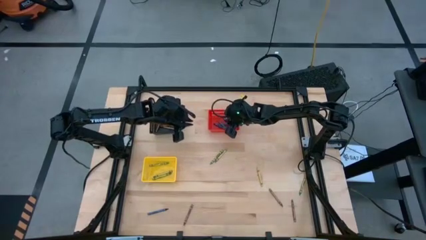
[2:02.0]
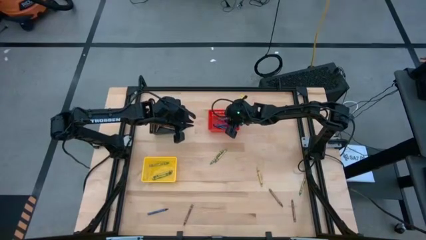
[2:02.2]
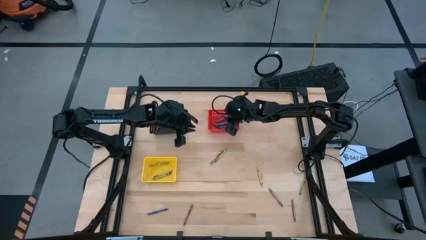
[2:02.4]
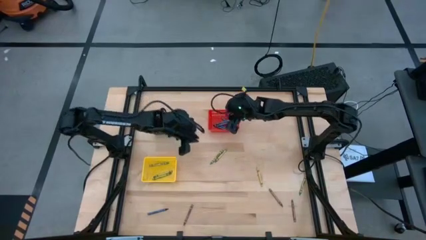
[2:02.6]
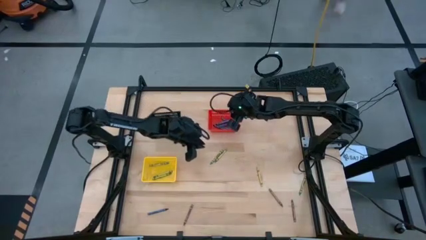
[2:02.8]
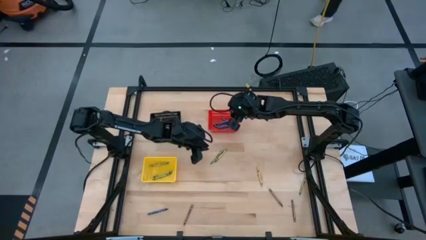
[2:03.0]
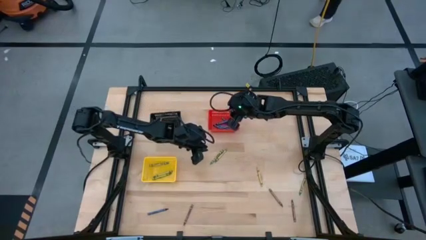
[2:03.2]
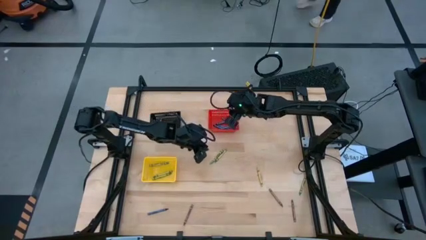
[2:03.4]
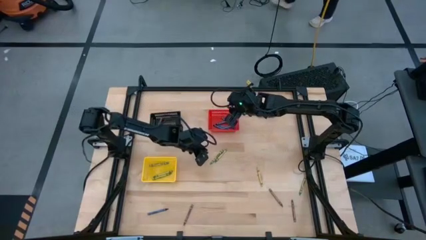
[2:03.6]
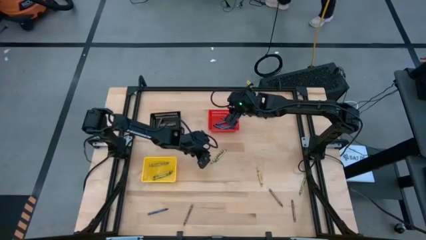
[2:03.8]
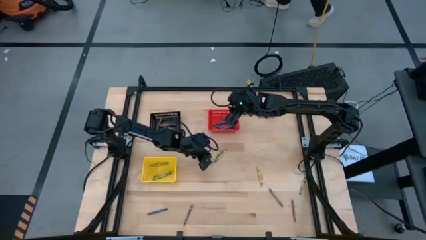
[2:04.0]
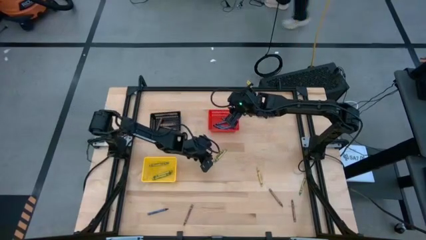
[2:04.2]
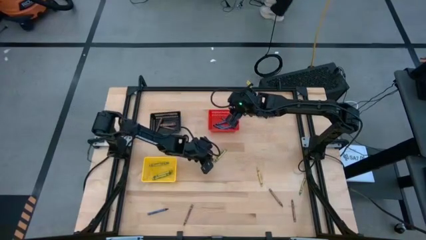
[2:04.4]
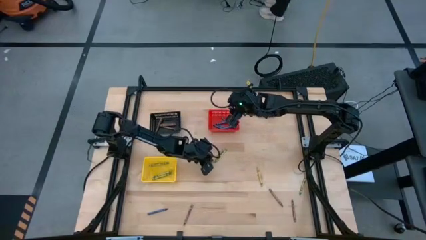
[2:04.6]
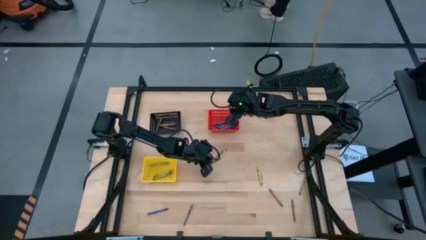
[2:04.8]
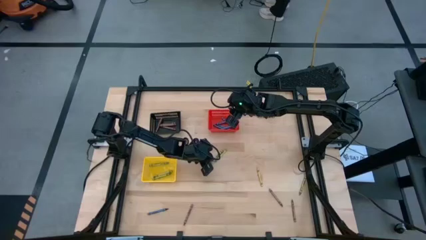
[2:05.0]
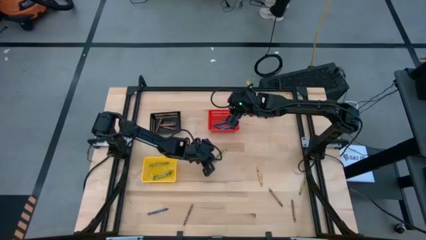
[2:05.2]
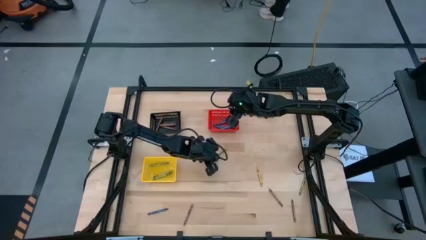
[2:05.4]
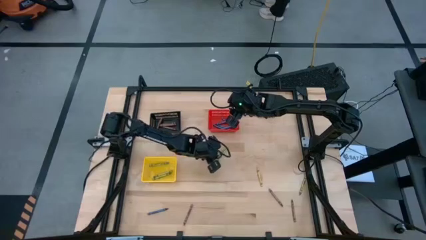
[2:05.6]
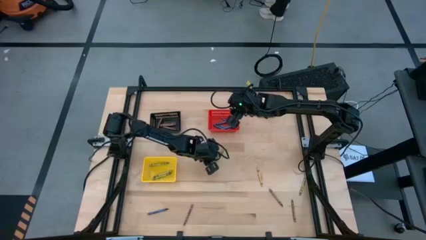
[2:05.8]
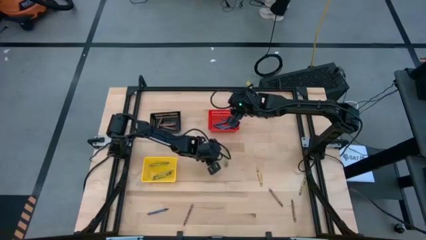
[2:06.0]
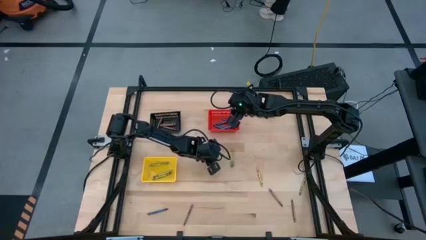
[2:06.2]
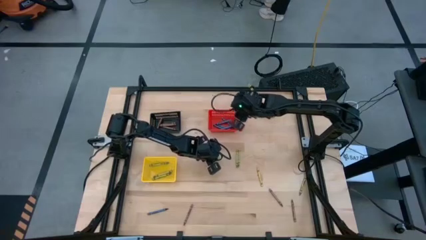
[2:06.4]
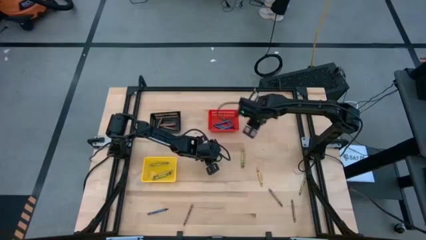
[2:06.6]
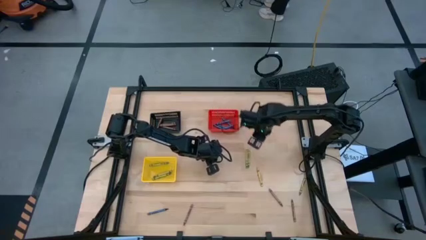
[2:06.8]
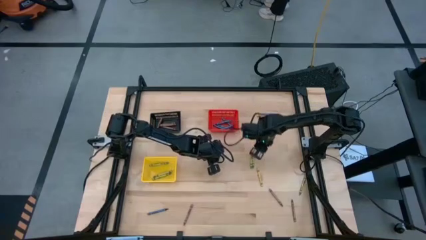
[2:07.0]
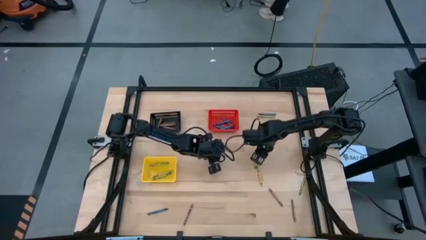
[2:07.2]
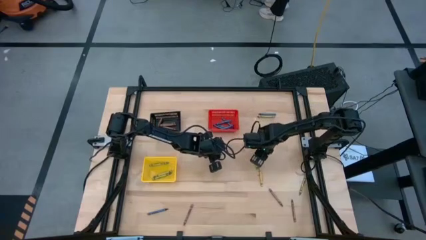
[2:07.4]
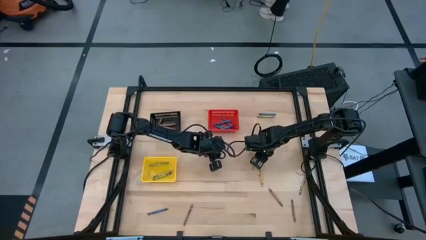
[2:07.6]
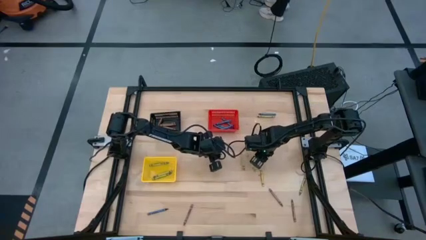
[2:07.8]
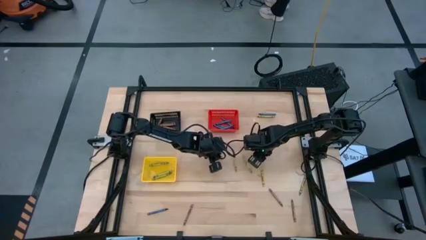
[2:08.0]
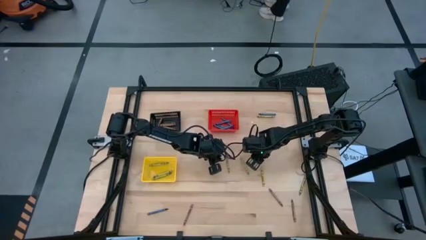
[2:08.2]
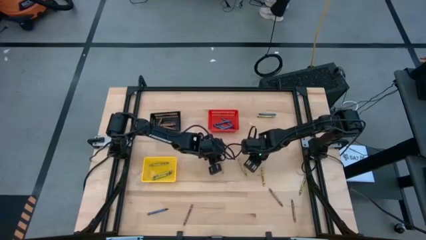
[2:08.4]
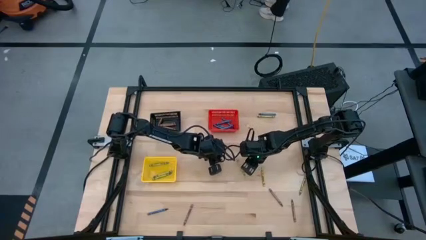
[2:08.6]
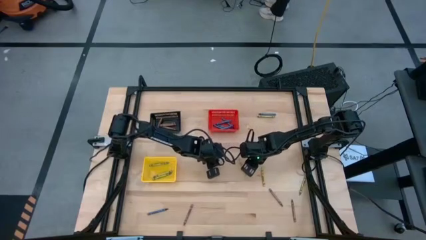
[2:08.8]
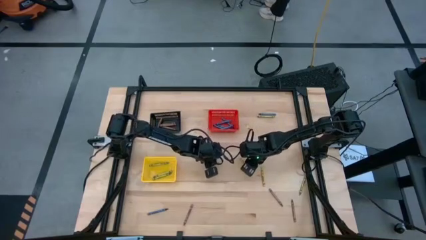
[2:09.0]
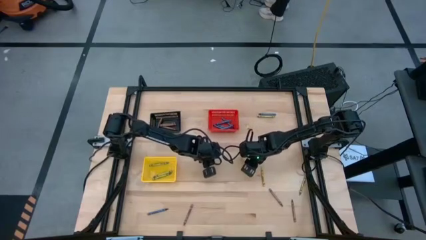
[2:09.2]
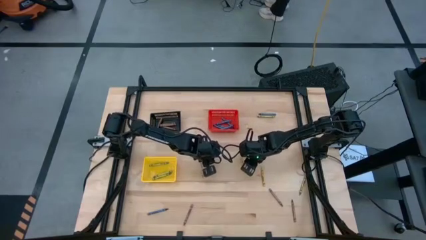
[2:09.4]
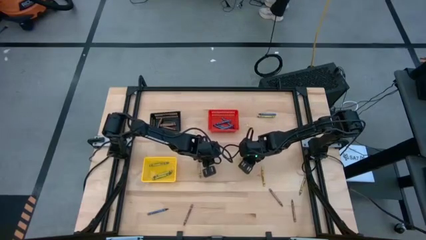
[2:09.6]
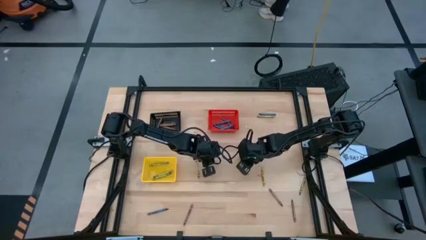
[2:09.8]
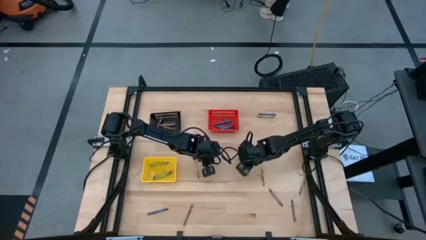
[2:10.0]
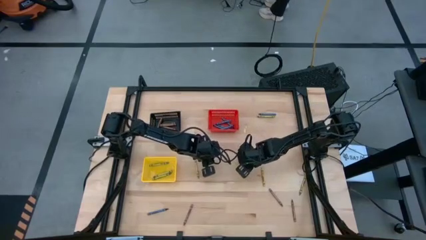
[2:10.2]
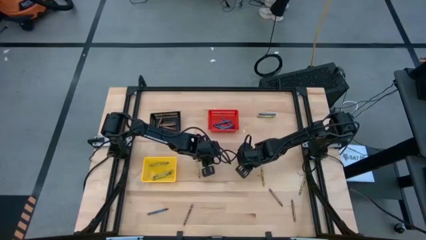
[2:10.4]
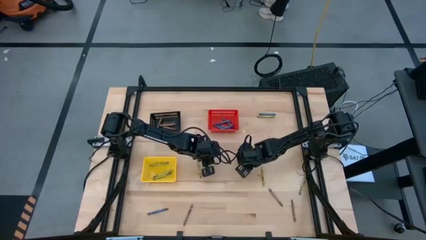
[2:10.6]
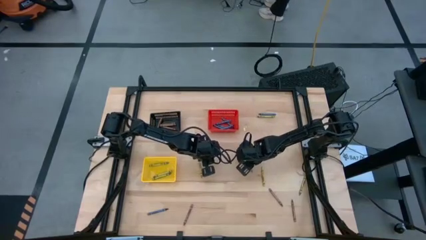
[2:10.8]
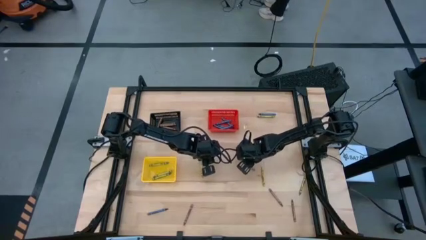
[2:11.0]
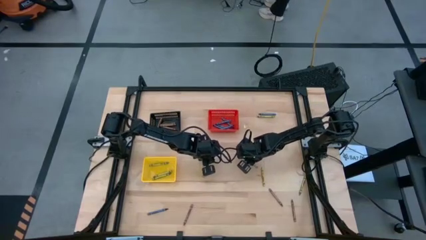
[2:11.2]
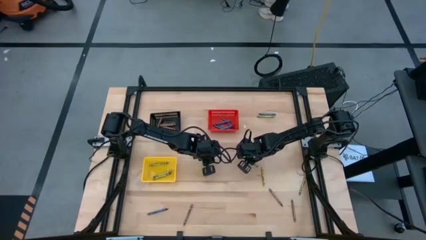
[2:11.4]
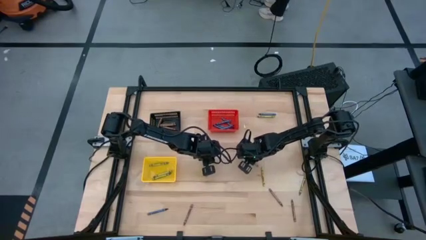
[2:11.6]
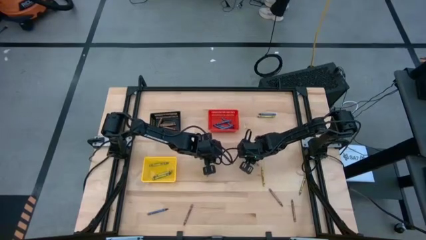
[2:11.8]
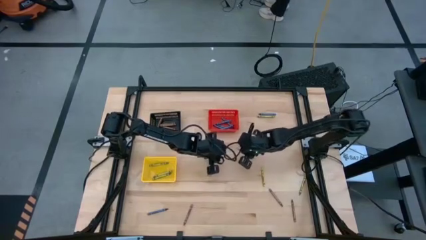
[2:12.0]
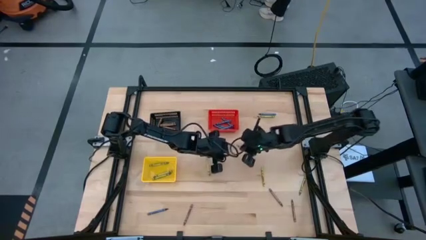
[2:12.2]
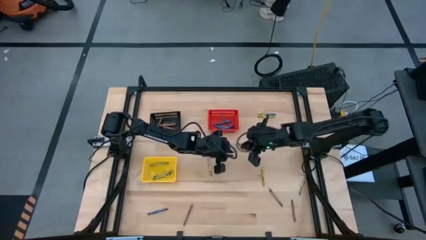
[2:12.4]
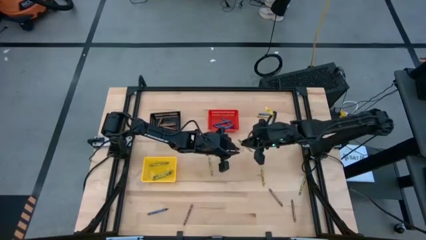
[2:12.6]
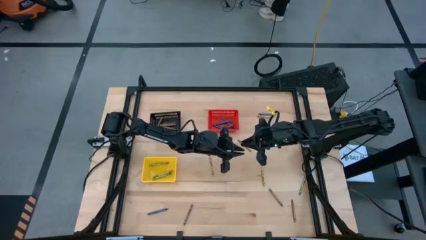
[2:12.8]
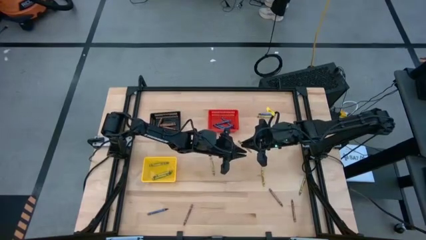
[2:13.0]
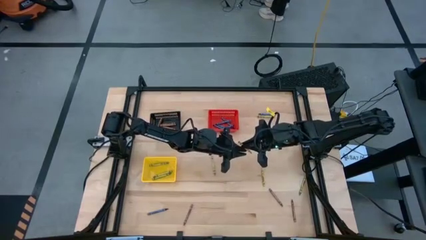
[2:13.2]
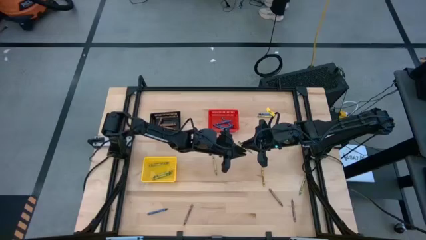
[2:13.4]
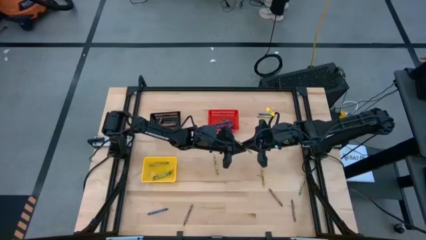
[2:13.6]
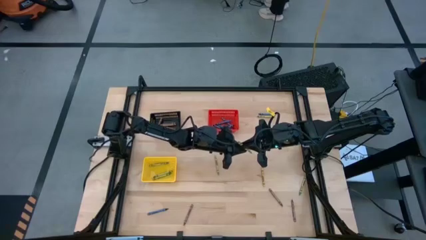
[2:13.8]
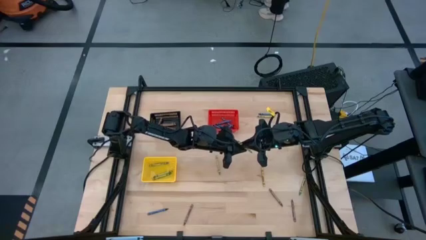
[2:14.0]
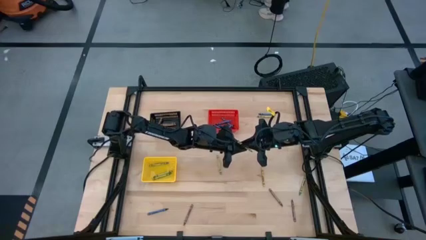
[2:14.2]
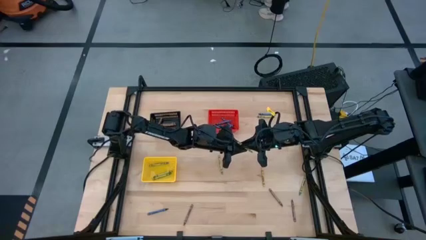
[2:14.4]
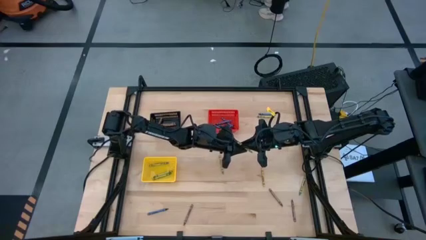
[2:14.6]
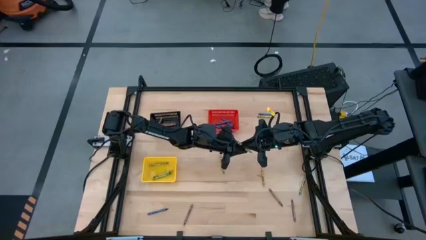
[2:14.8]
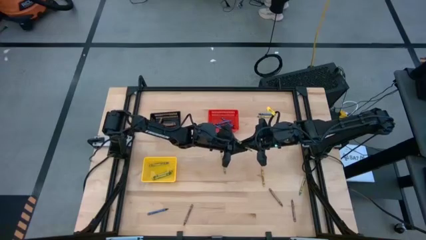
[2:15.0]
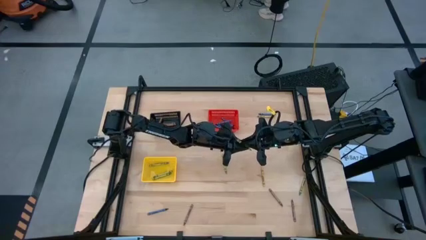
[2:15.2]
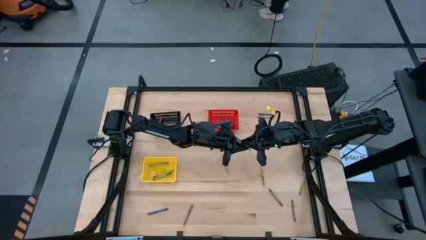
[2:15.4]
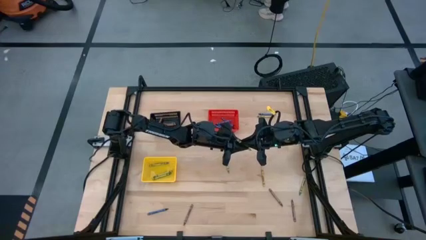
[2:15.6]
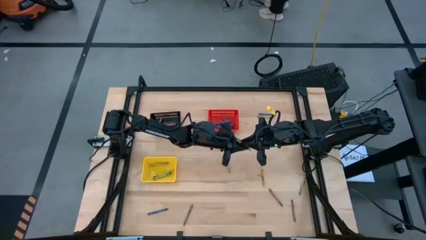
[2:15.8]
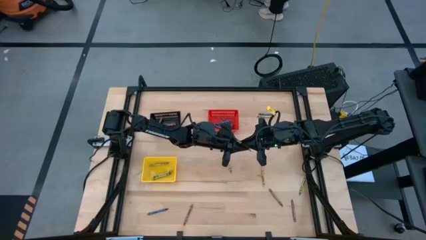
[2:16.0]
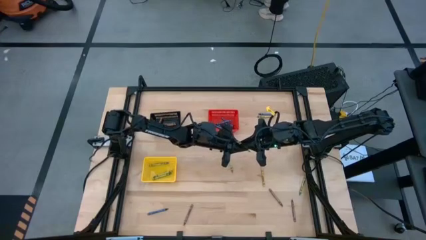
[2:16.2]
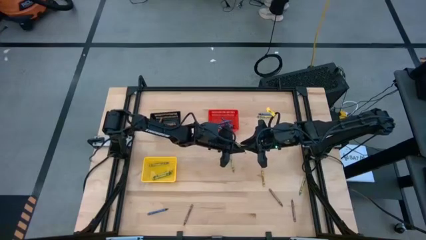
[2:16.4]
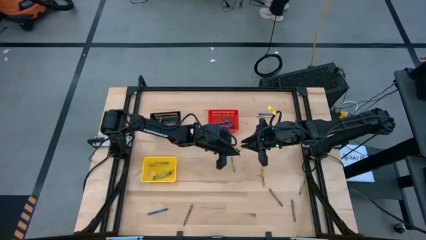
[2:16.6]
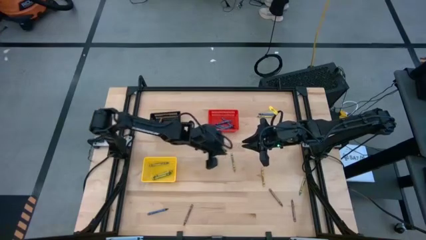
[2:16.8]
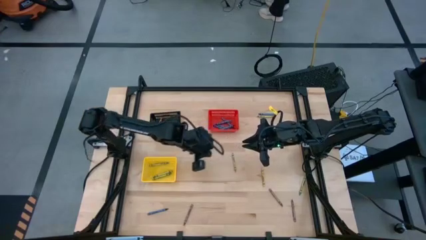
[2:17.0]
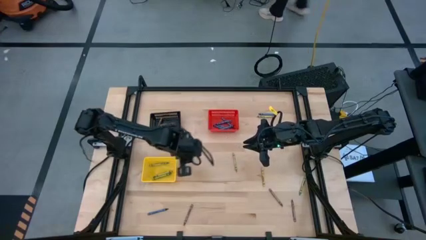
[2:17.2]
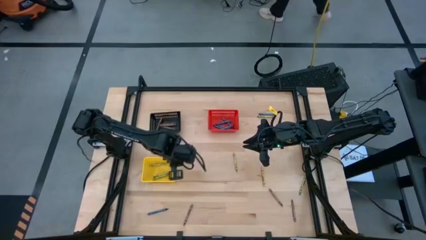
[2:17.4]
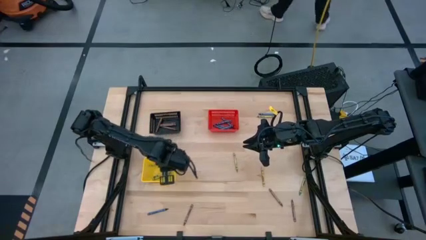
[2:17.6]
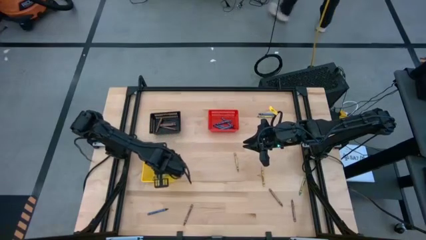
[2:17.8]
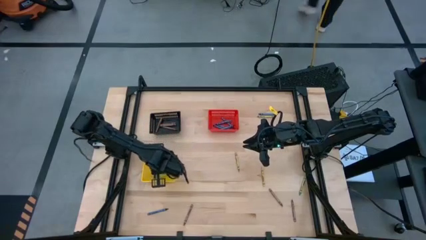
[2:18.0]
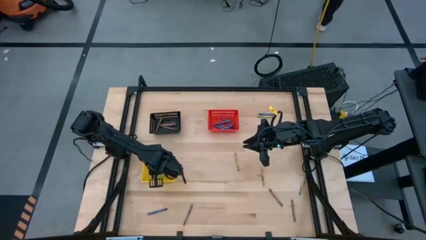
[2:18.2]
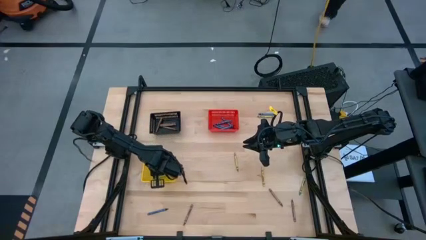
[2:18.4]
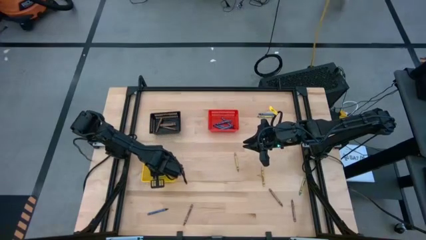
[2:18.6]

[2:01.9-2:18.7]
Task: Sort crayons
Put the green crayon into the yellow bin
